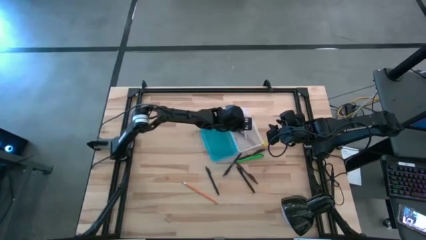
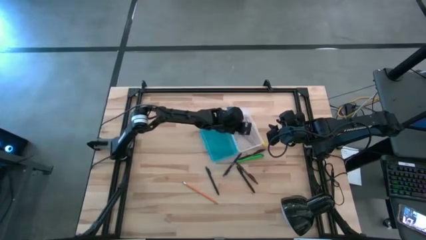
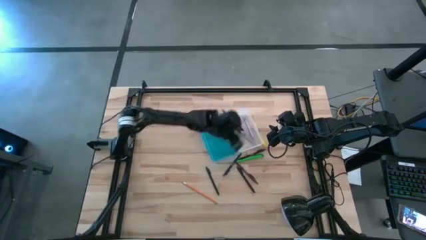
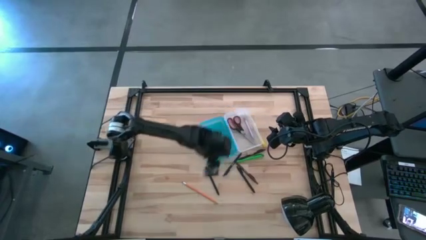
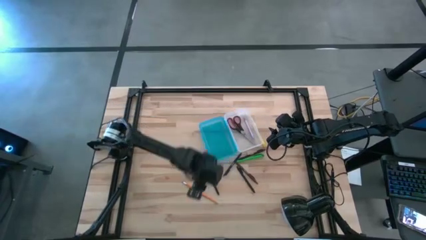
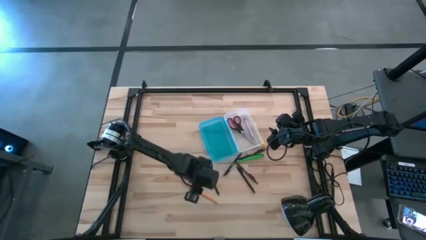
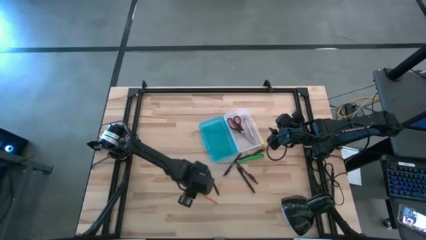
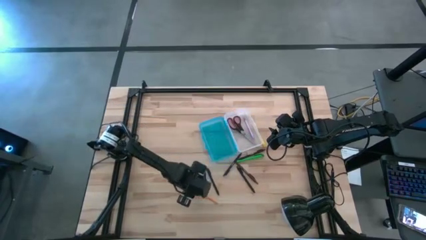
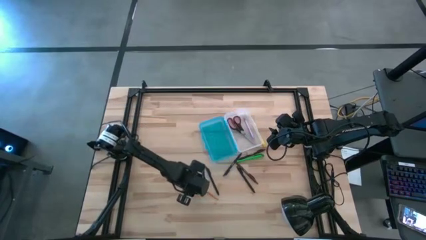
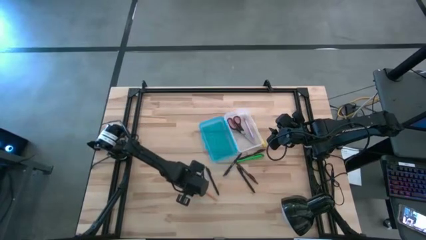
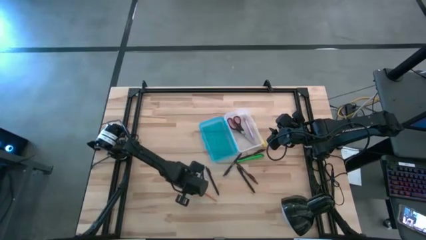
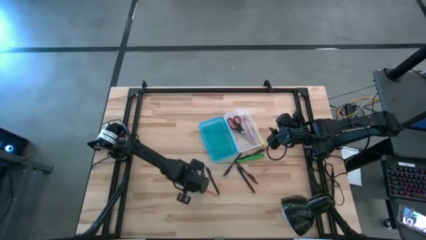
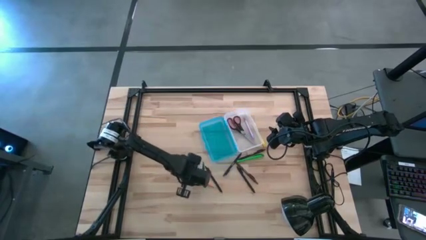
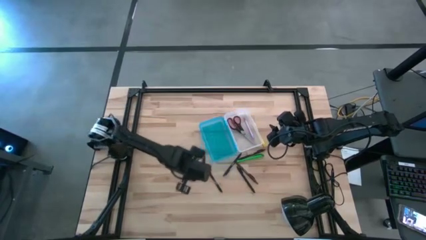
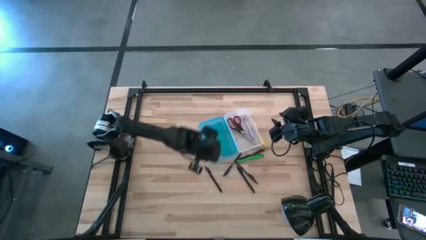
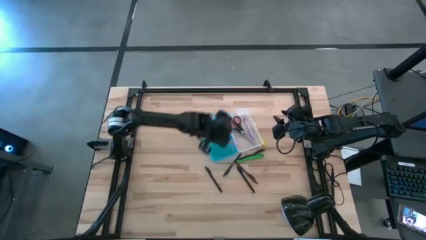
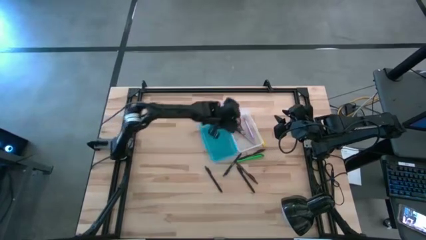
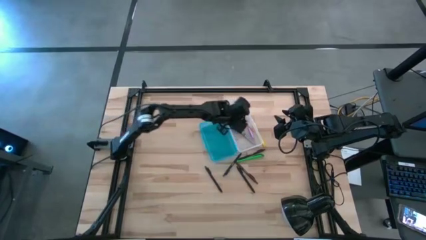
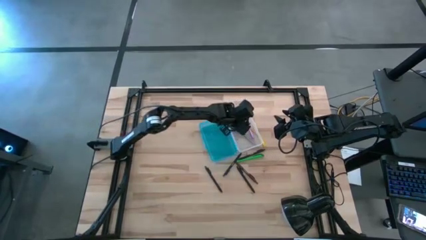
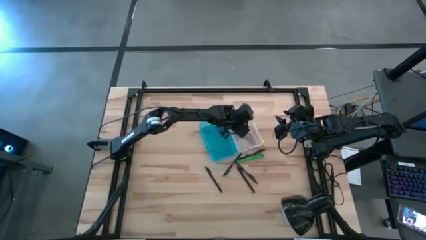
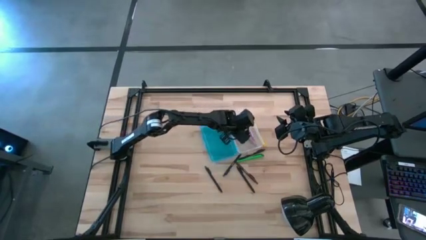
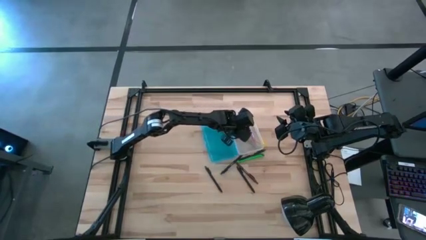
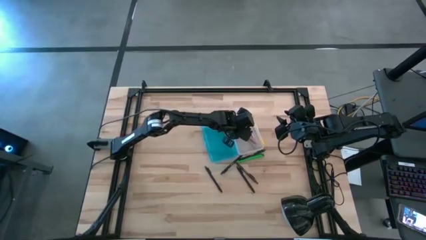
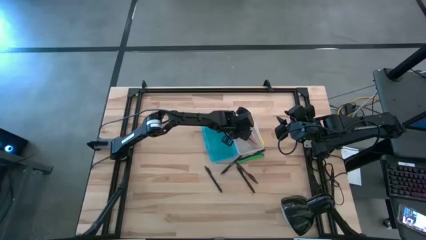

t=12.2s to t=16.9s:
Task: Pick & place school supplies into a supply box
Put the orange pencil into the blue supply box

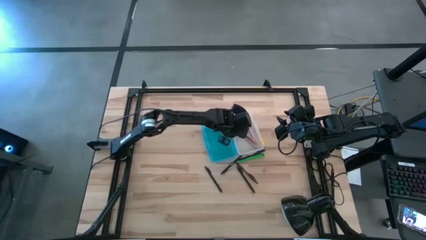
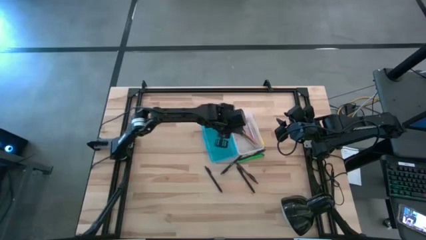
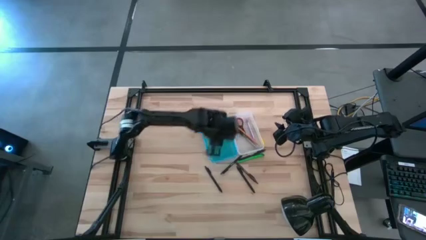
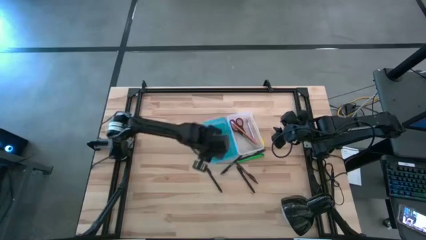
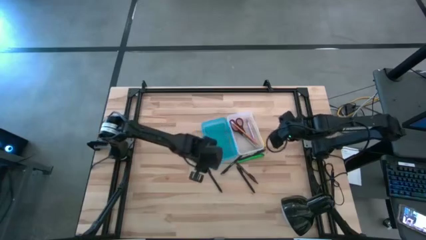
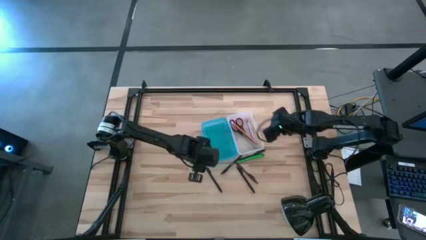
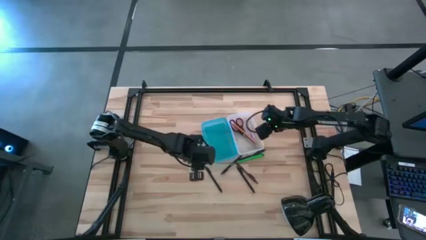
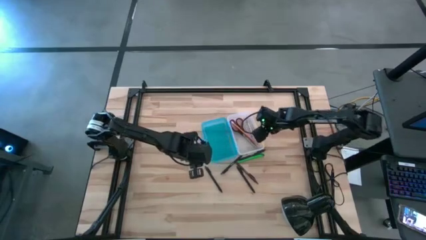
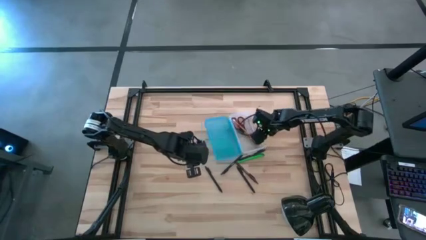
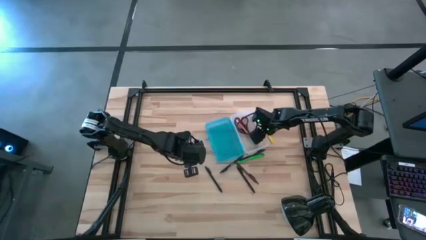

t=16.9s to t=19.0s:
Put the yellow pen into the blue supply box

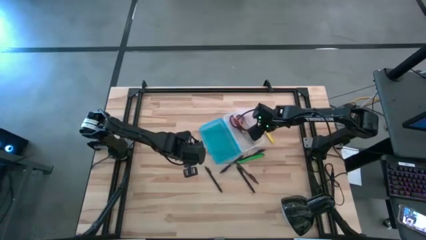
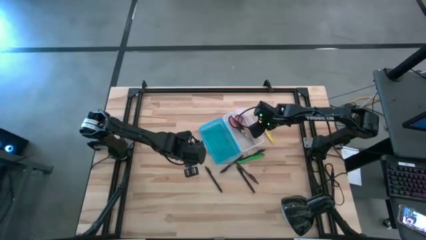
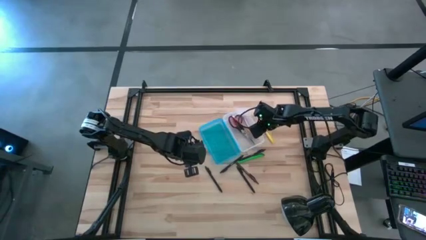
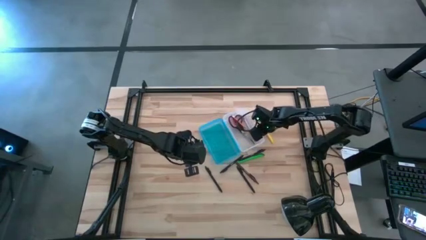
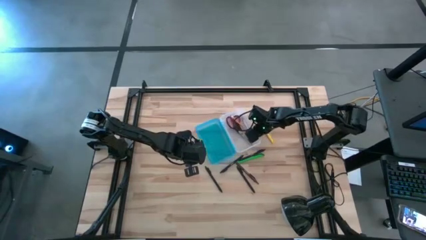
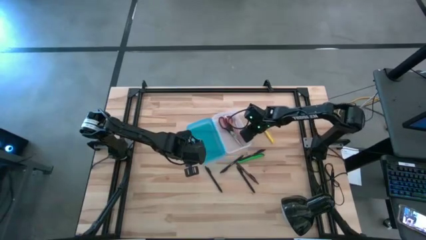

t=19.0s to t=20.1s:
Adjust the blue supply box

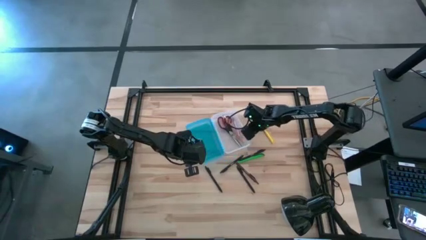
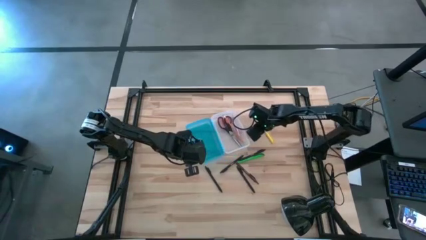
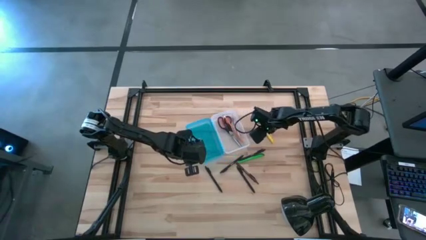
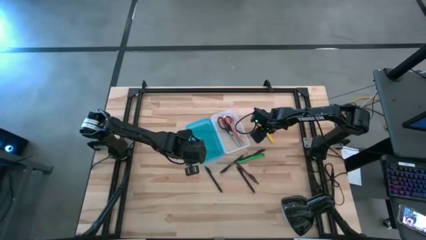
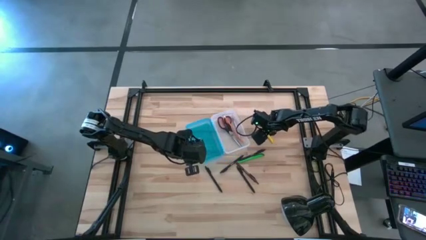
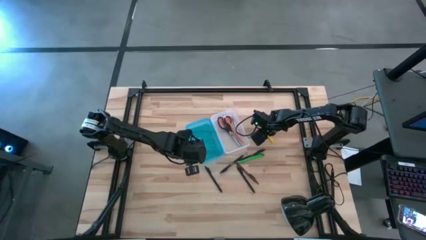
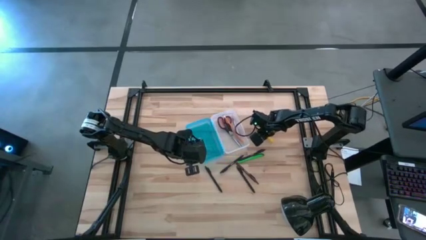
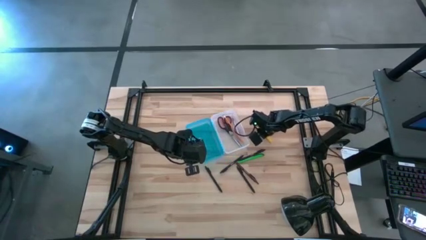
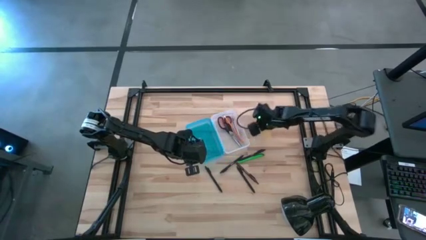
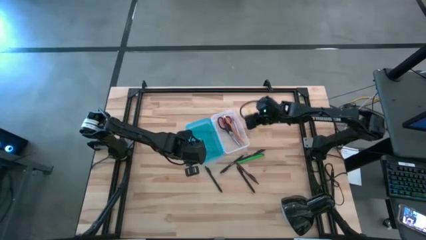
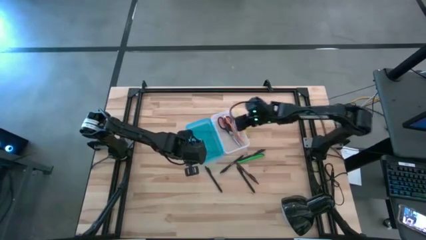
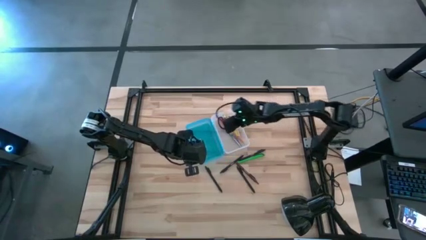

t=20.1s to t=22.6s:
Put the yellow pen into the blue supply box

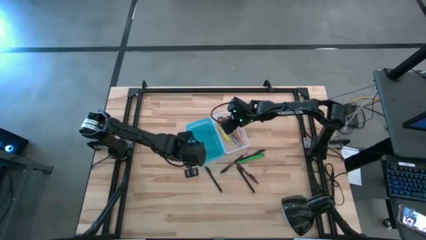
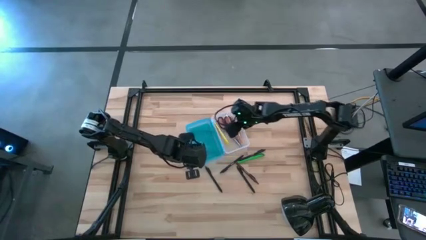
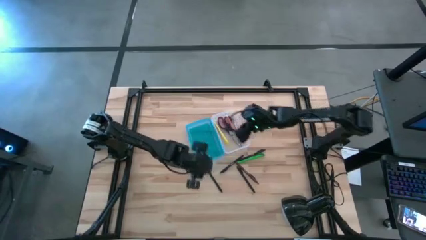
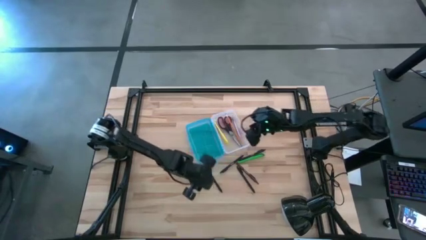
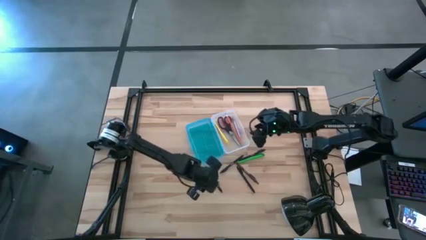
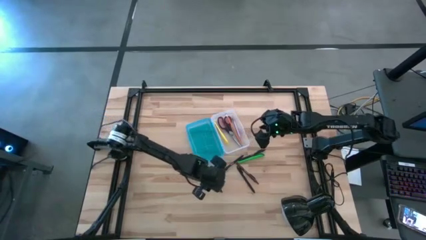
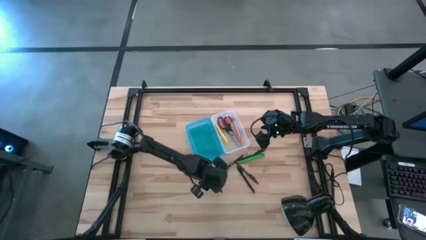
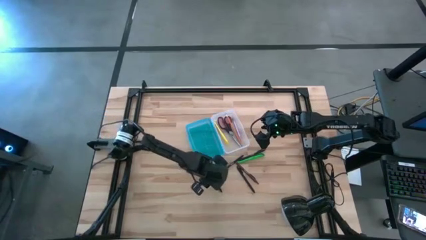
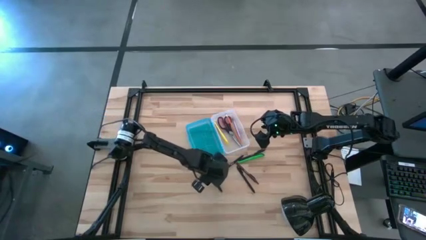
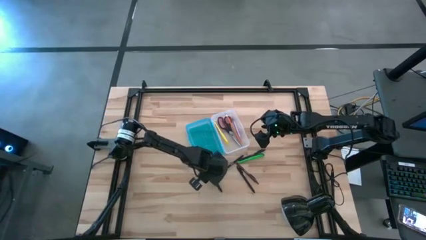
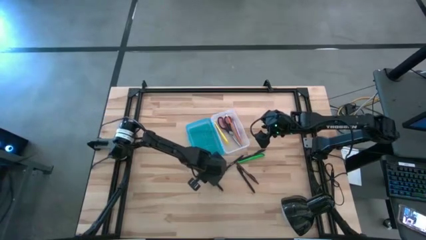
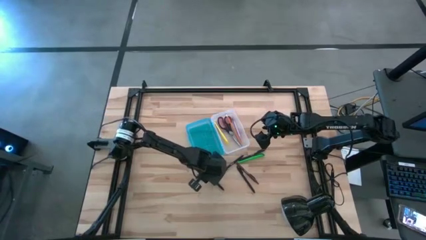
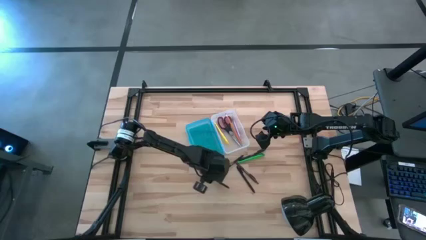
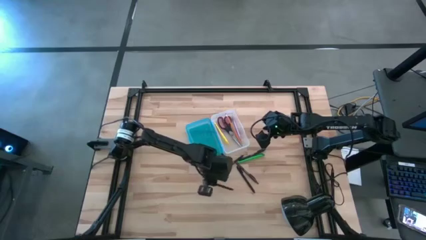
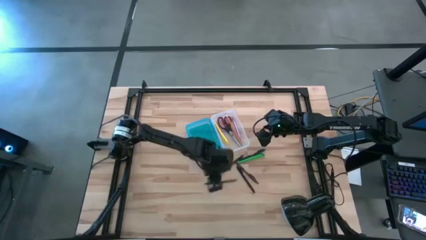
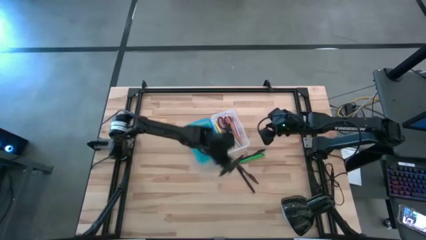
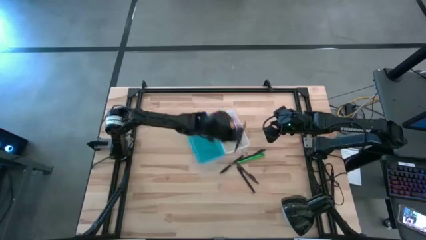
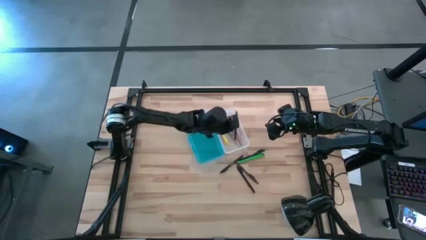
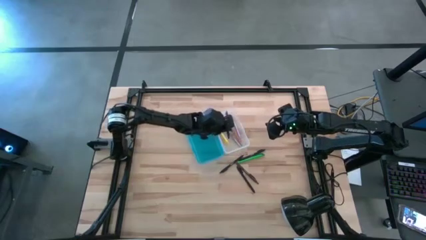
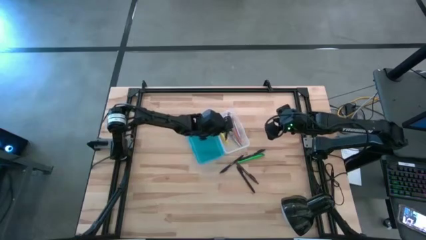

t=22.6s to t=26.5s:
Put the black pen into the blue supply box

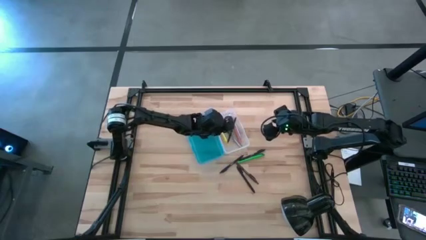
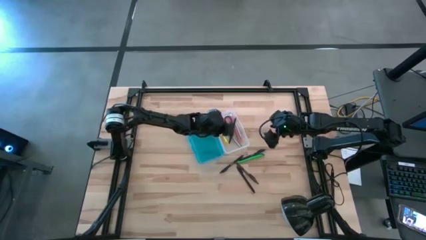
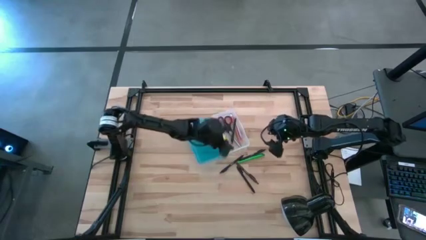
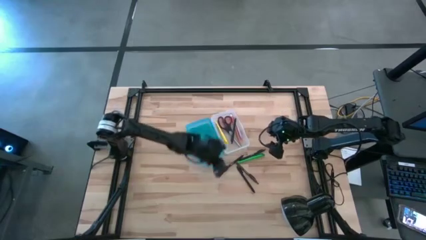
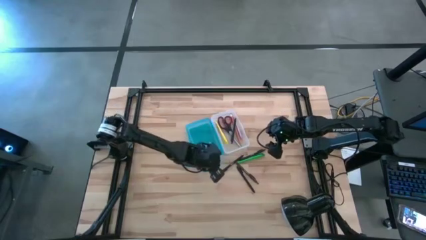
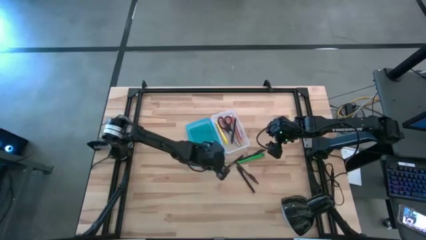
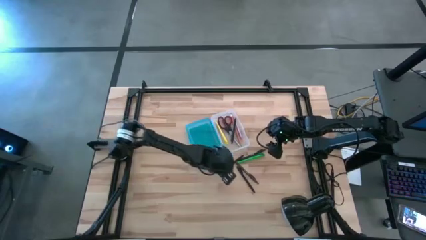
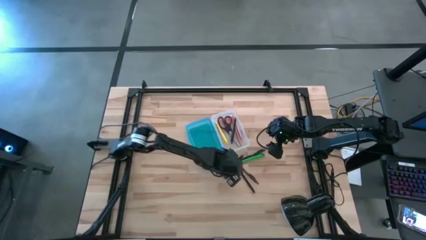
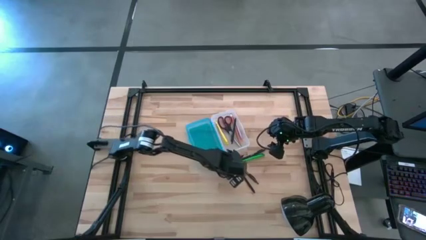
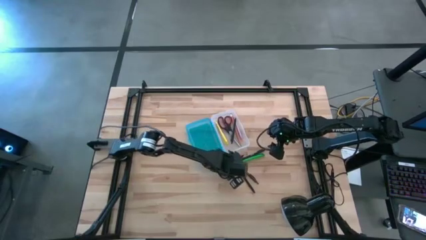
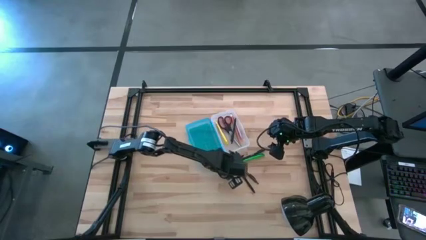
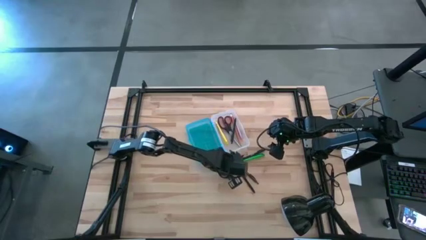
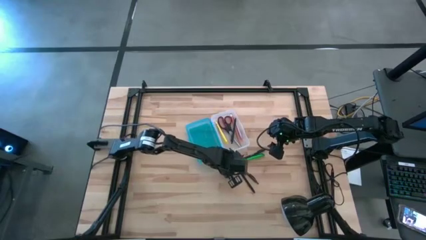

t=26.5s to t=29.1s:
Put the black pen into the blue supply box
